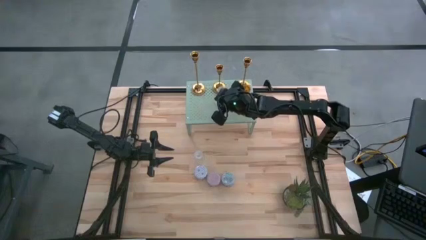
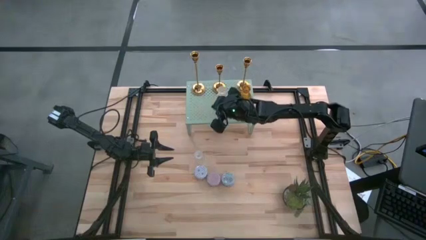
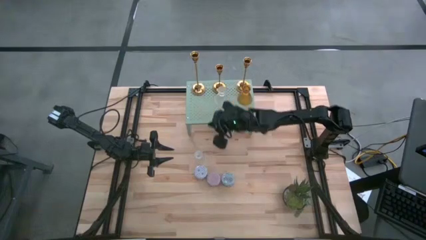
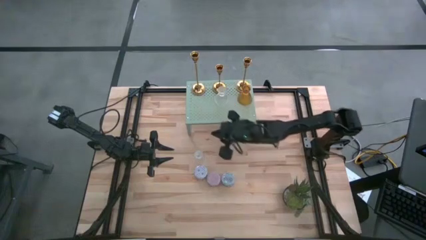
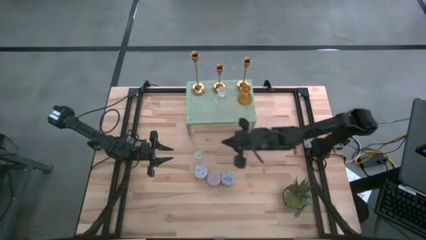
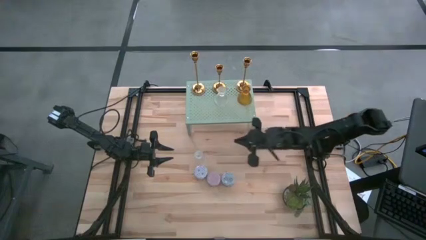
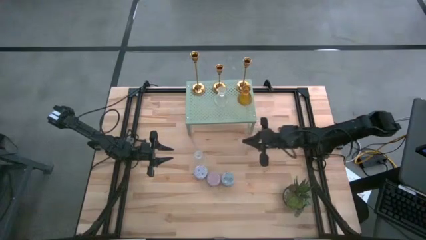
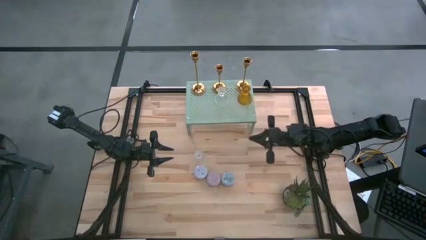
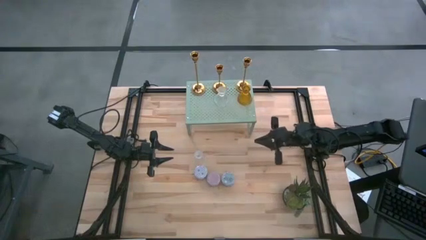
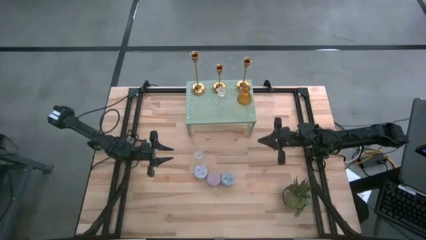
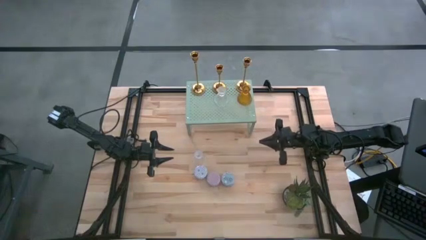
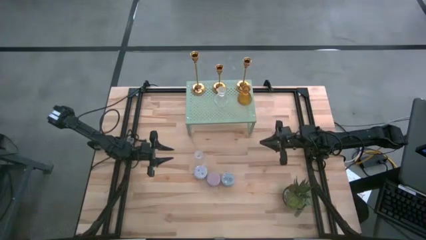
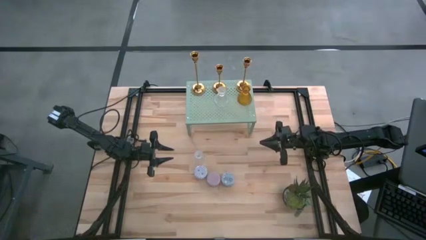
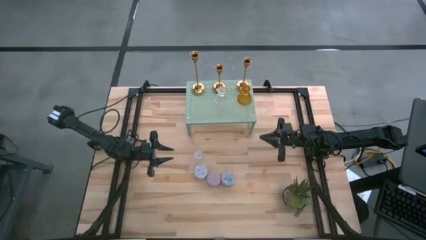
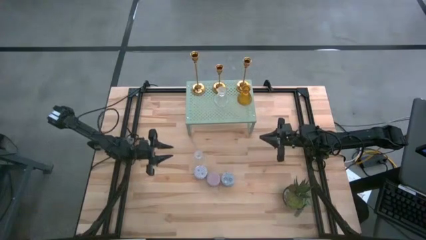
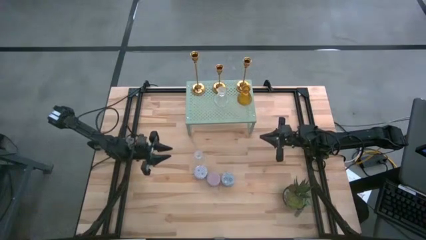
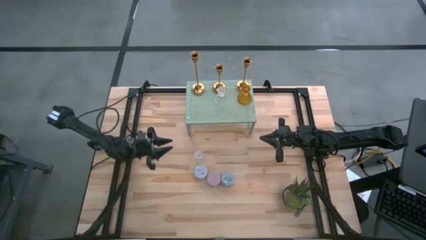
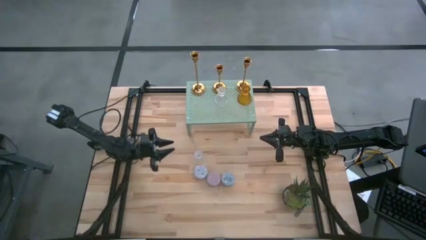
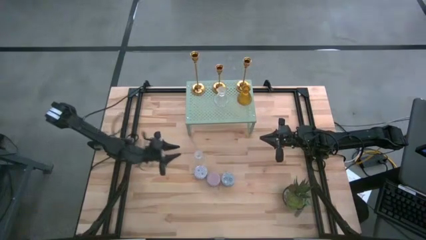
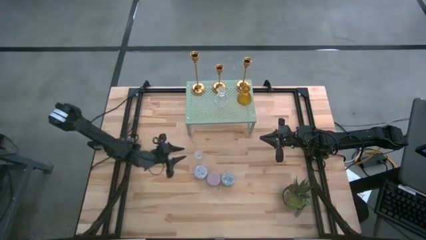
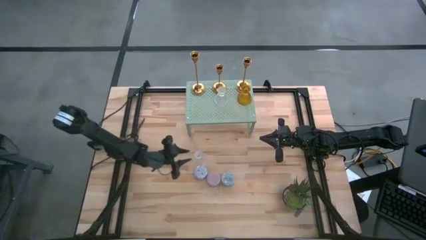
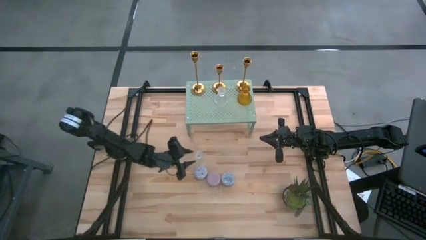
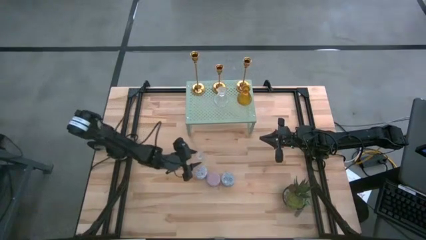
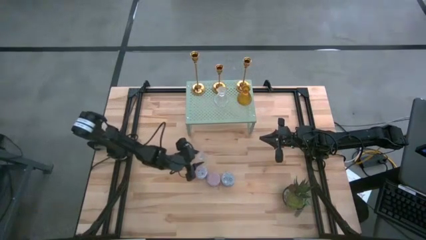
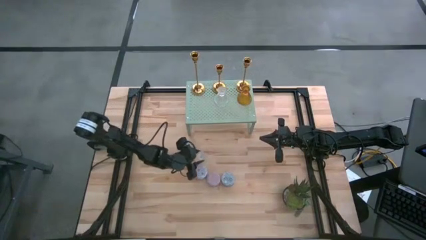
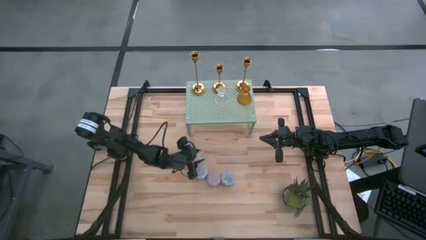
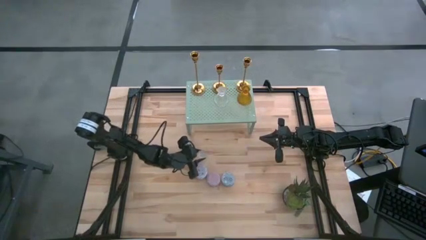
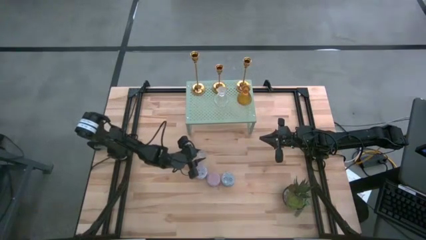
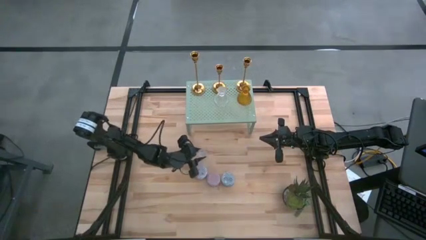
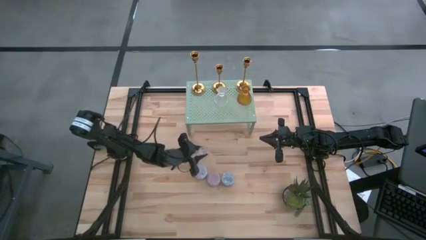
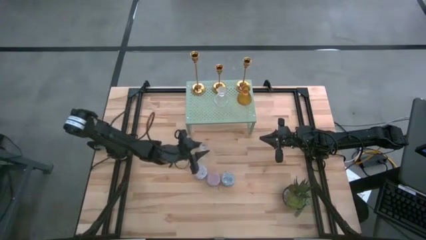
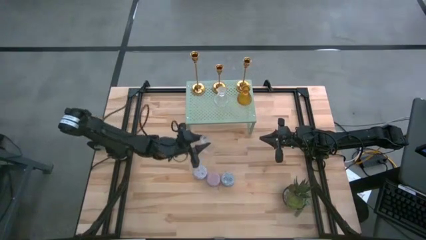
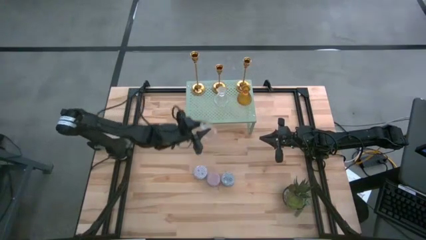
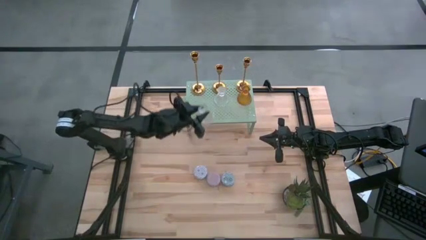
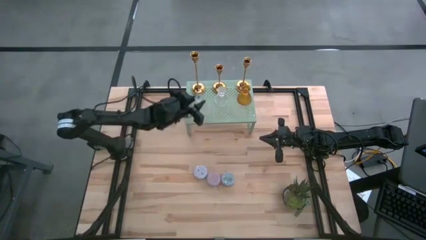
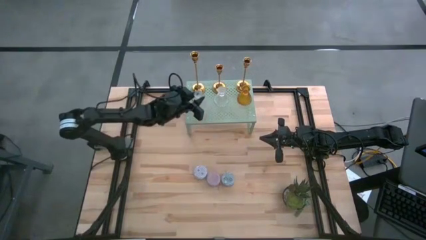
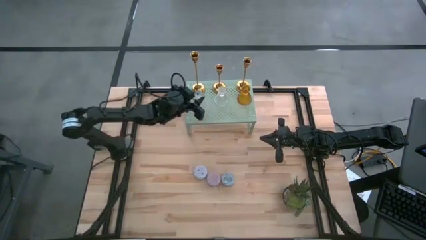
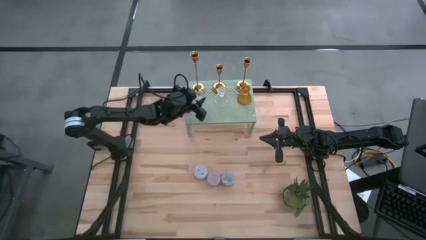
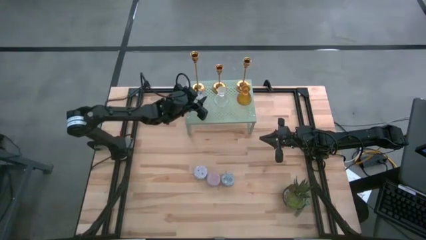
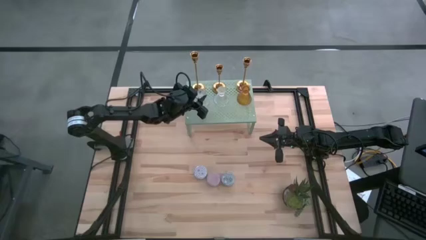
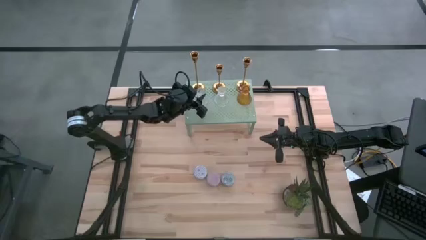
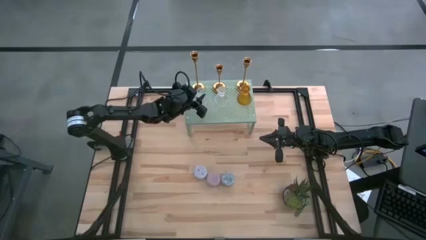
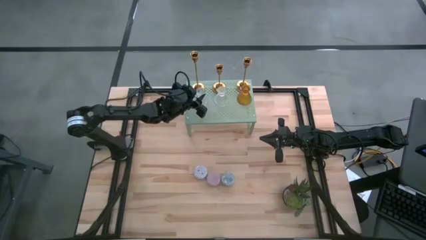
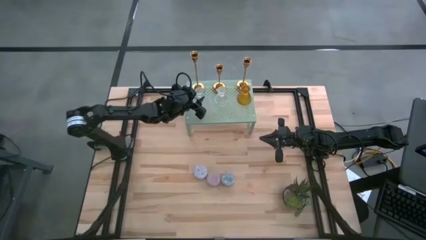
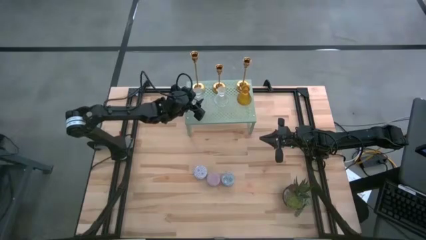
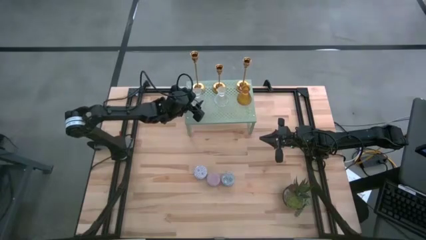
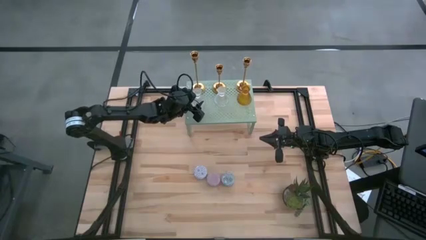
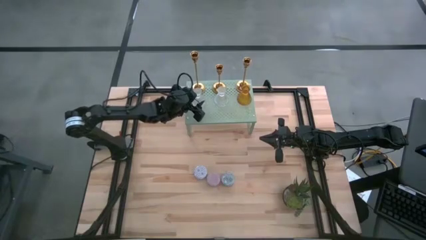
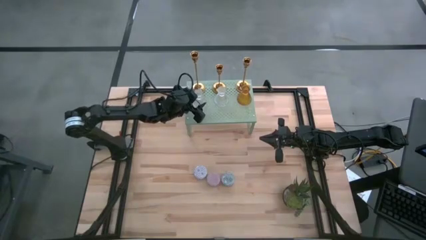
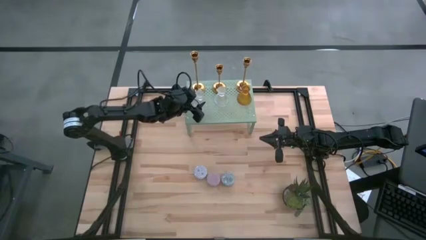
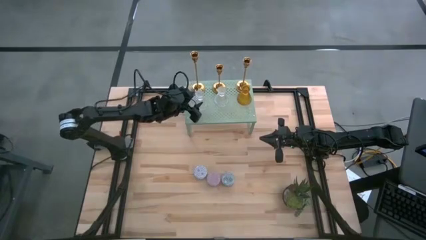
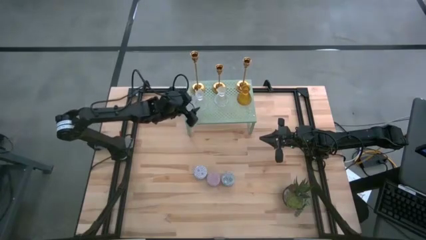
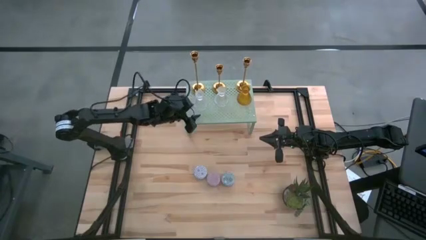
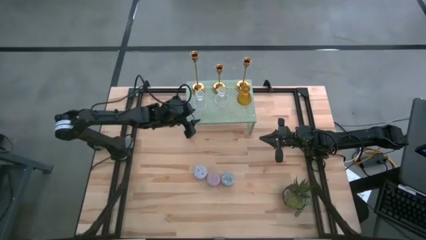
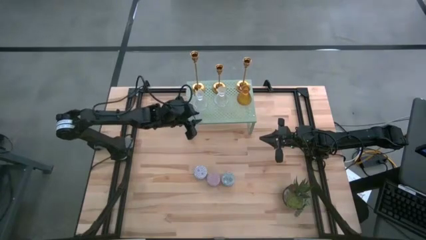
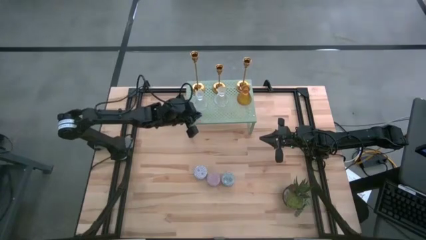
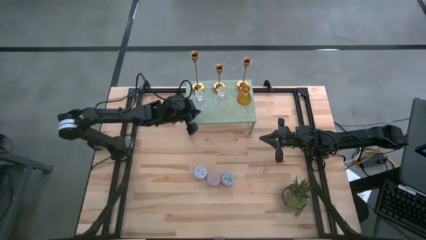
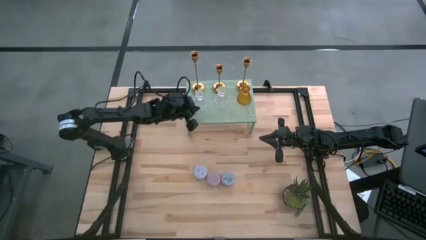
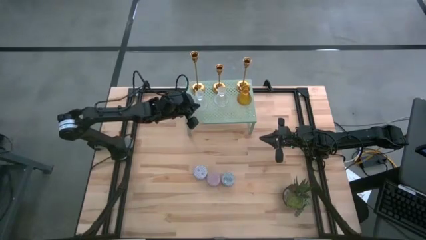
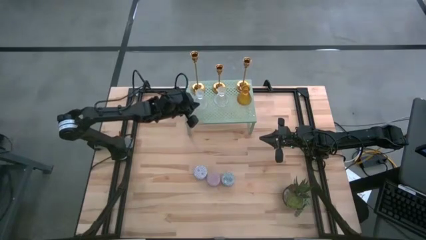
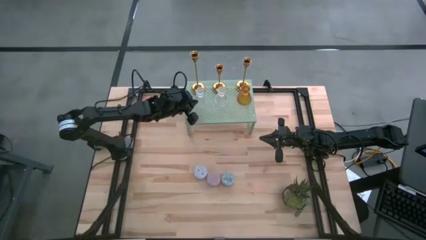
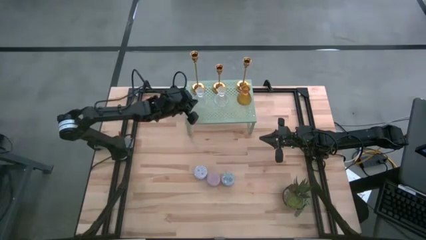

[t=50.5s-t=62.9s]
Task: Pick & Place candle stick holders
Put the transparent candle holder on the shelf
